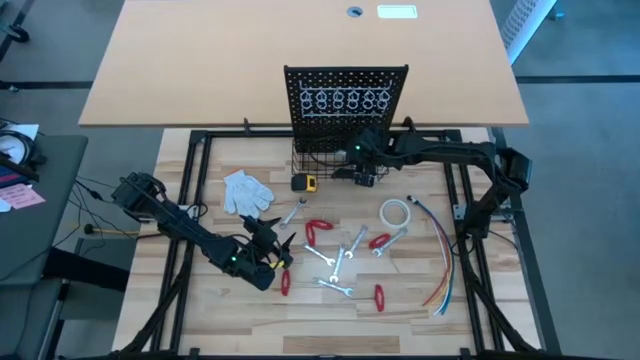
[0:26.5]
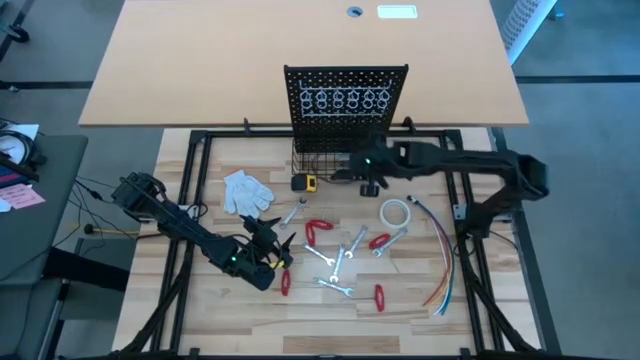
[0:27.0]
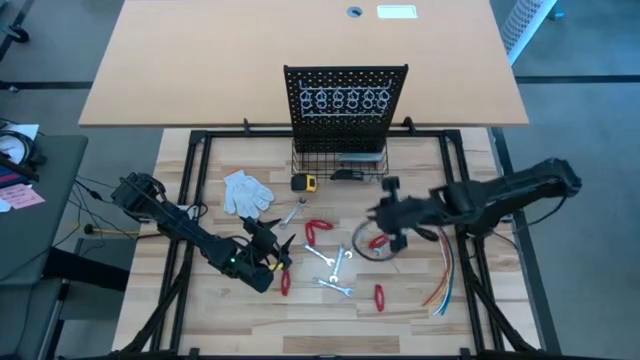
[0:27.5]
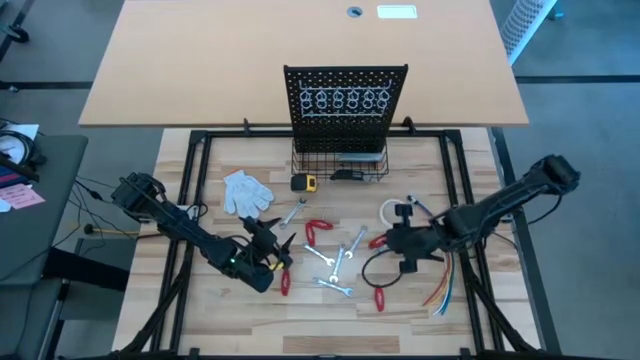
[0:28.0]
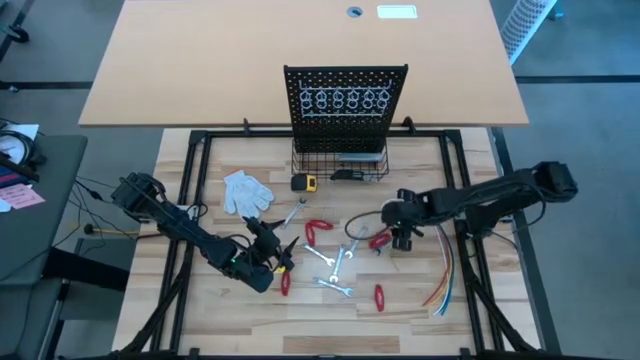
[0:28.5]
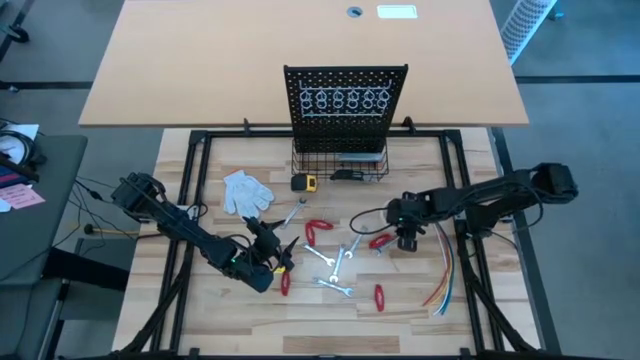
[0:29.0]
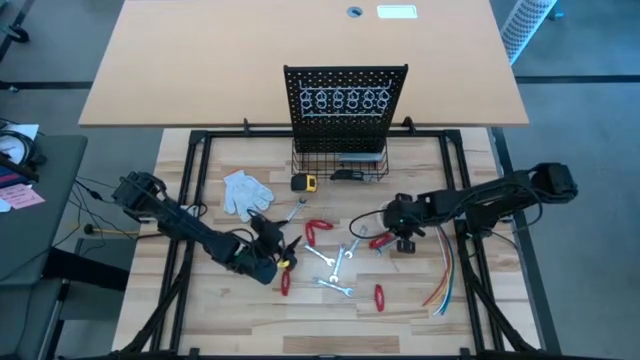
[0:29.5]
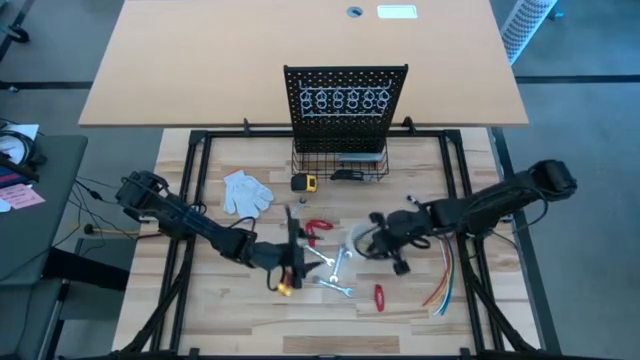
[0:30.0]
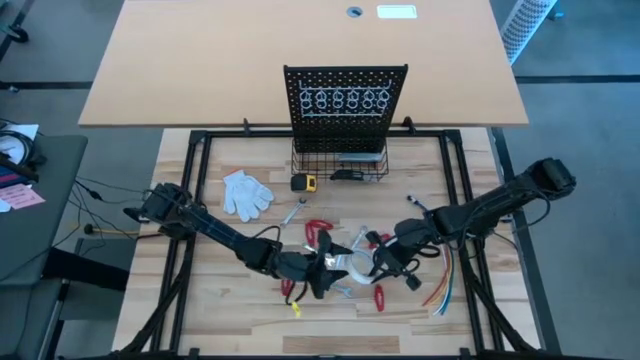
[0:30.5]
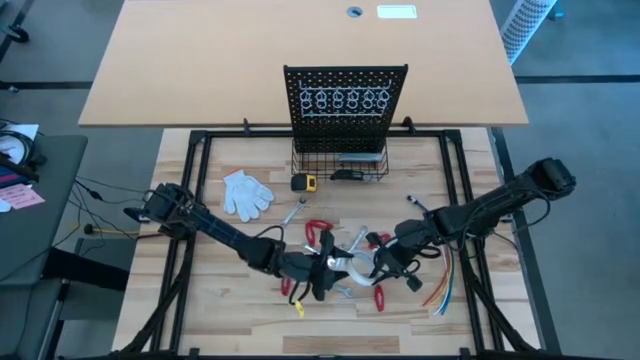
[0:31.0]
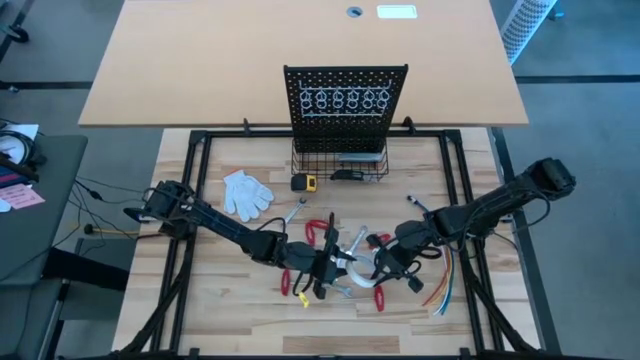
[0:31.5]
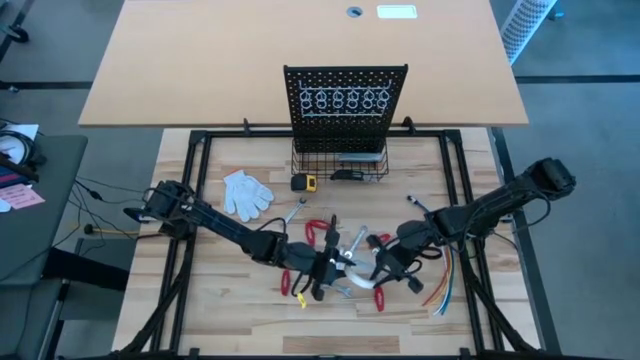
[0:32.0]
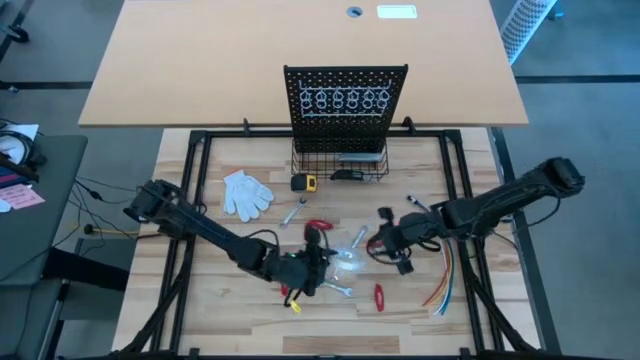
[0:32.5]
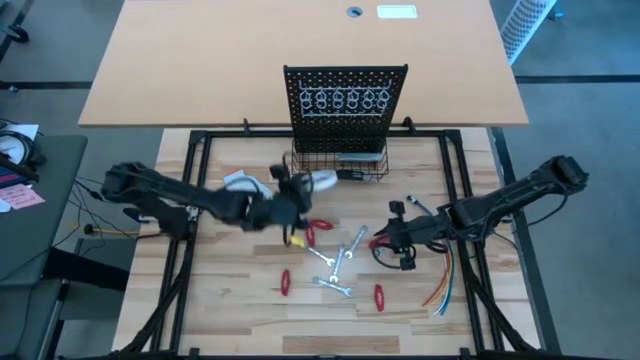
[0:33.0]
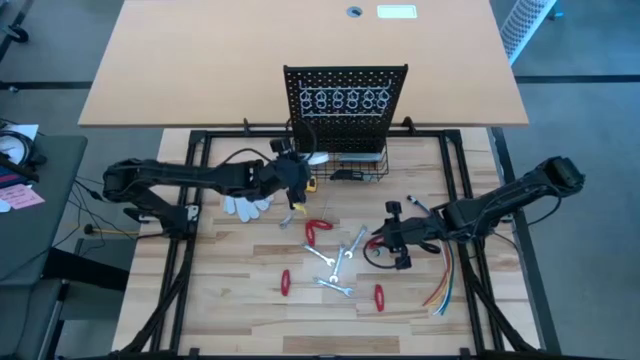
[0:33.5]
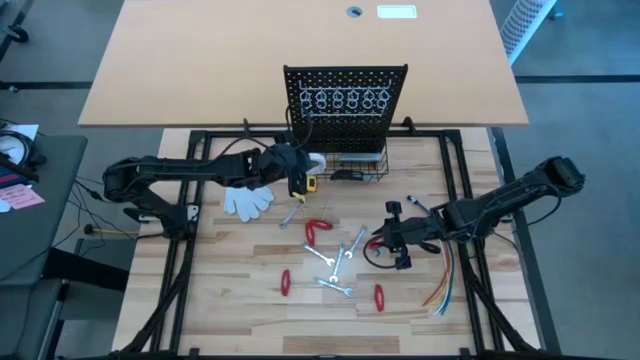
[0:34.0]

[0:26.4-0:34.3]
Task: Hang tools onto peg board
Put the white masking tape into the black wire basket of the peg board

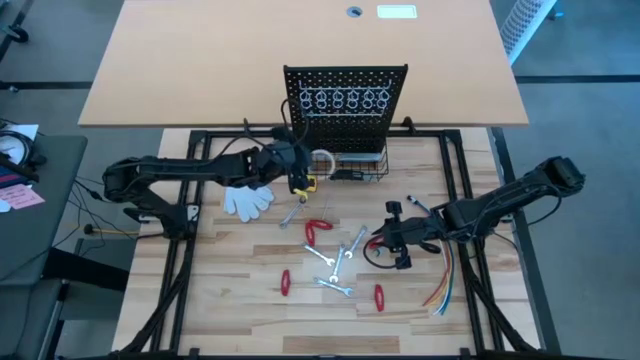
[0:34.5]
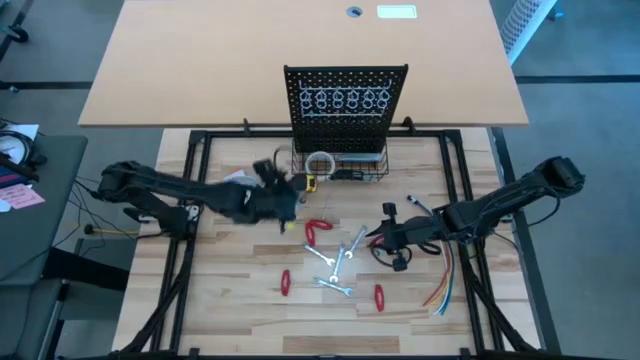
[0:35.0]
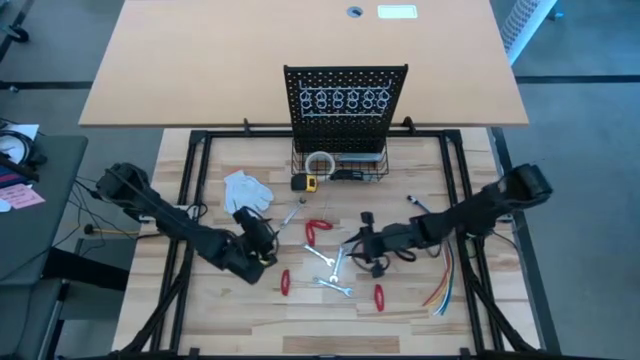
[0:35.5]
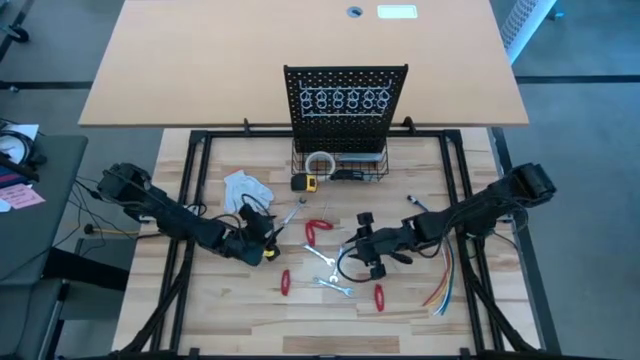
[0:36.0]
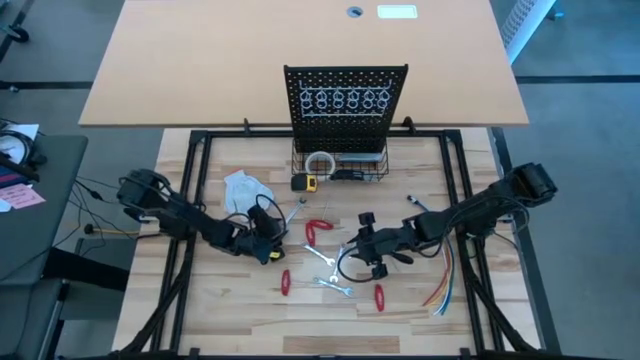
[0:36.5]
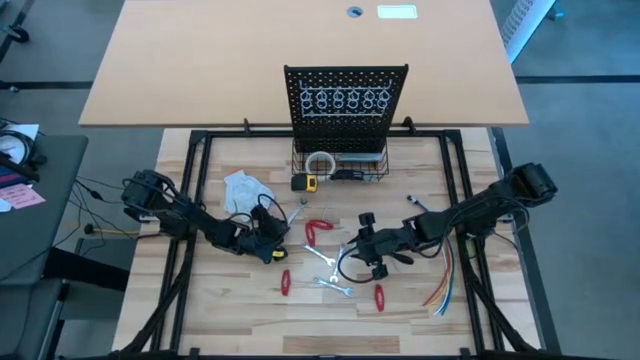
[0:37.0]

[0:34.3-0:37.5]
Hang the silver wrench on the peg board

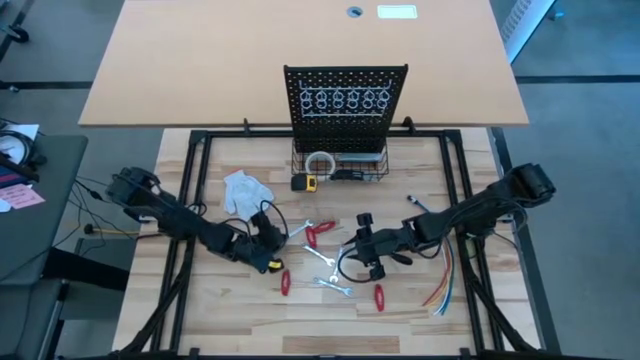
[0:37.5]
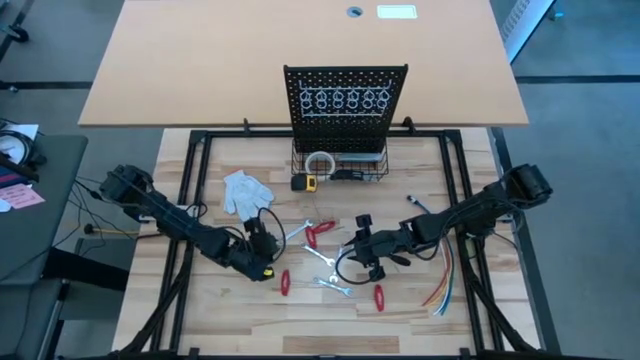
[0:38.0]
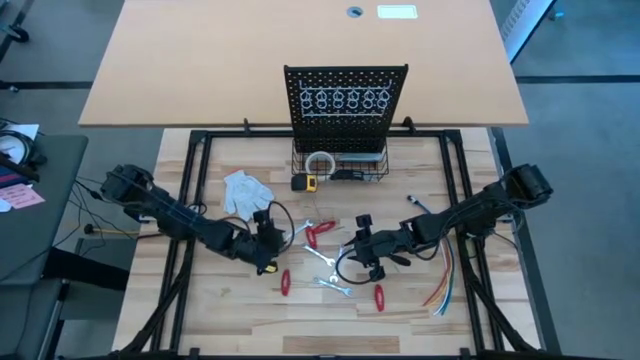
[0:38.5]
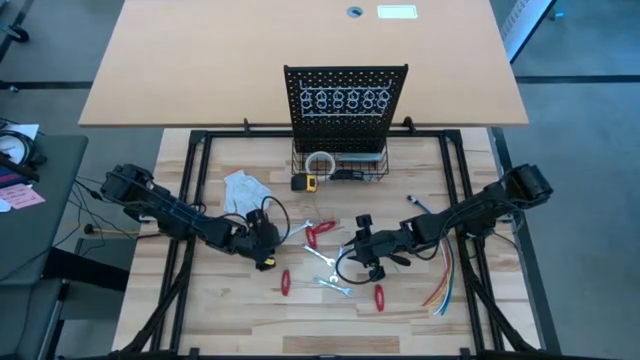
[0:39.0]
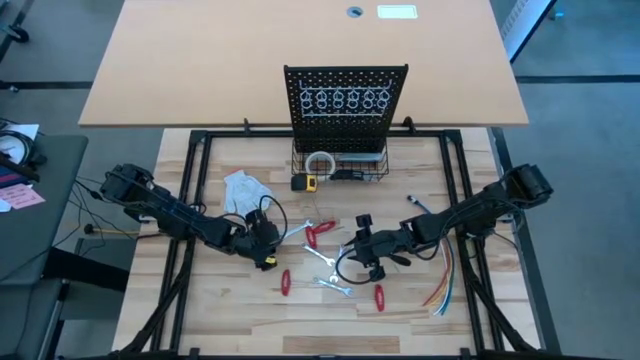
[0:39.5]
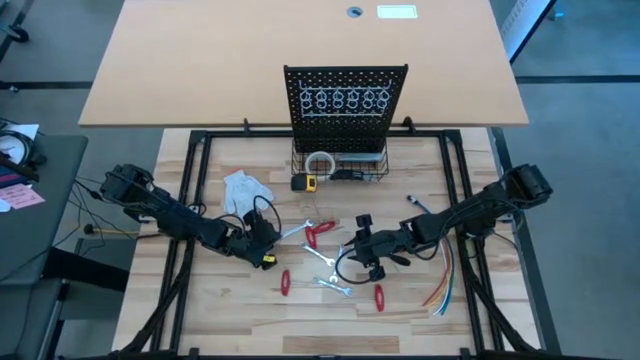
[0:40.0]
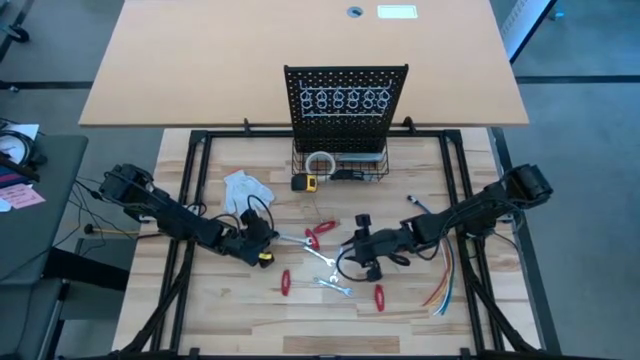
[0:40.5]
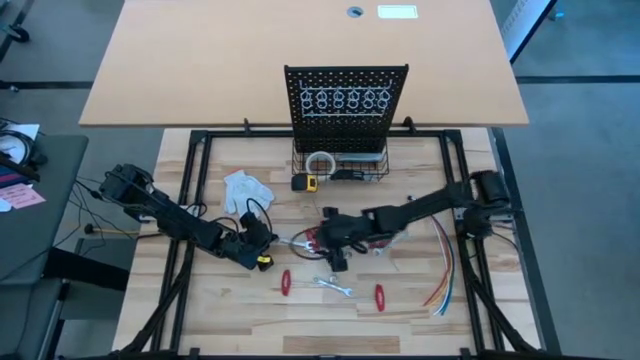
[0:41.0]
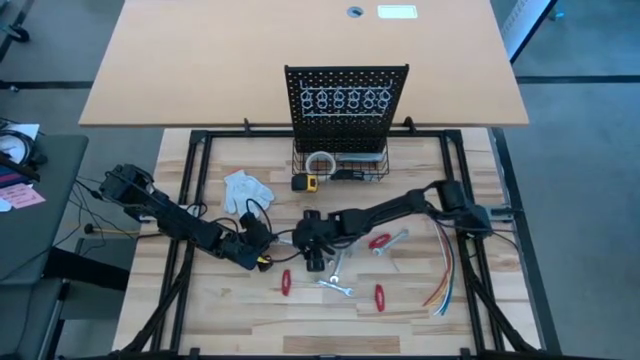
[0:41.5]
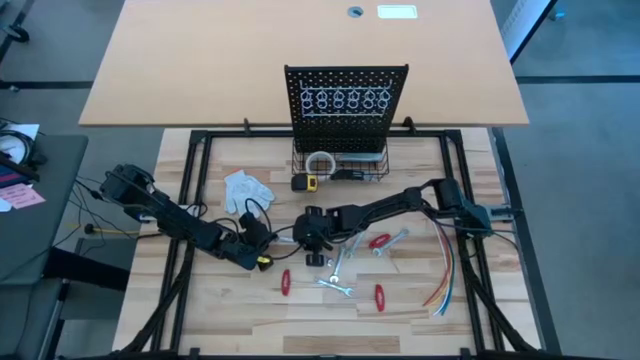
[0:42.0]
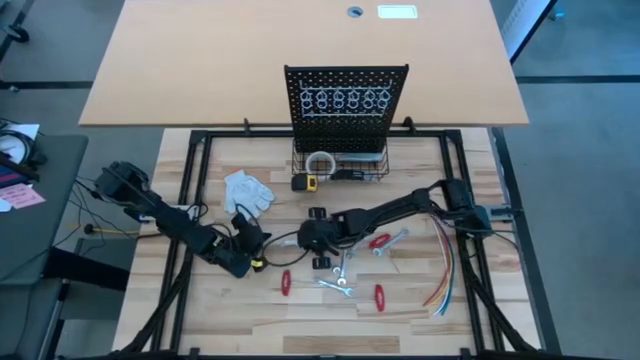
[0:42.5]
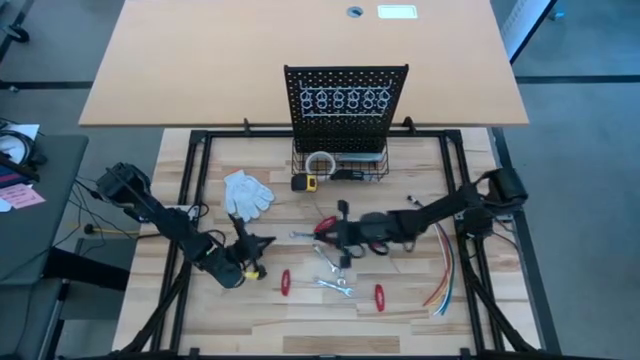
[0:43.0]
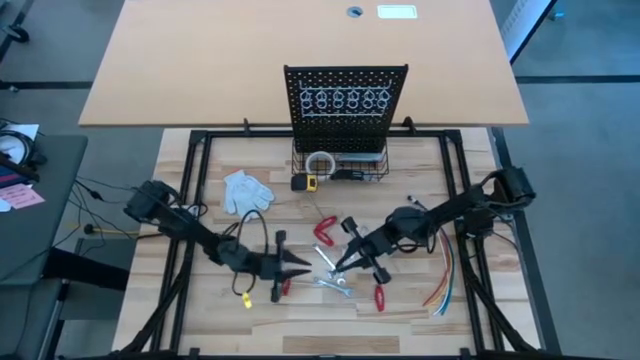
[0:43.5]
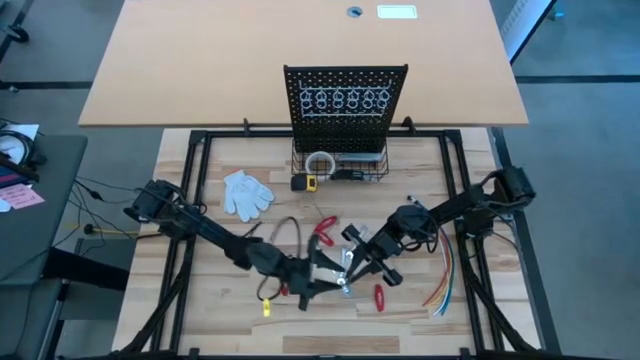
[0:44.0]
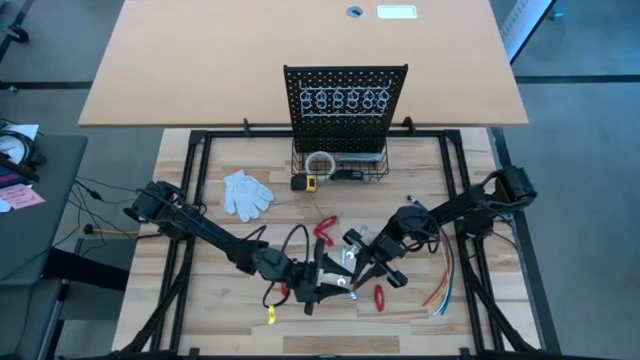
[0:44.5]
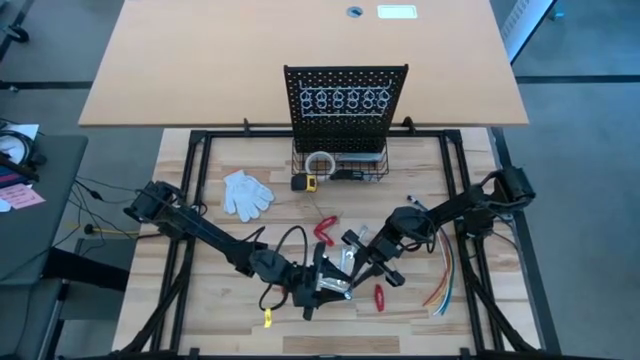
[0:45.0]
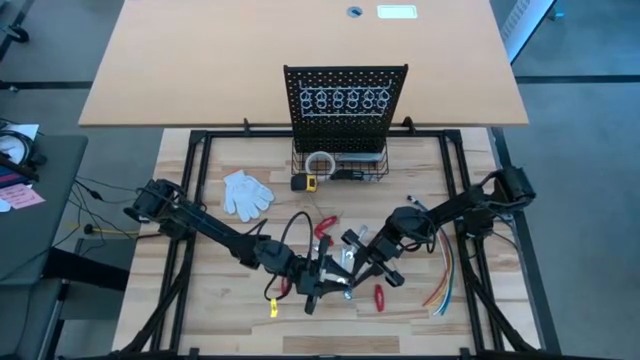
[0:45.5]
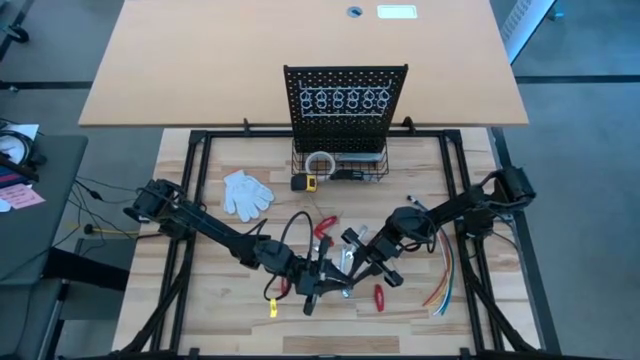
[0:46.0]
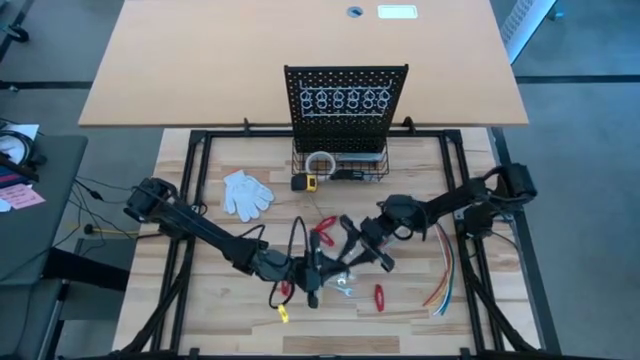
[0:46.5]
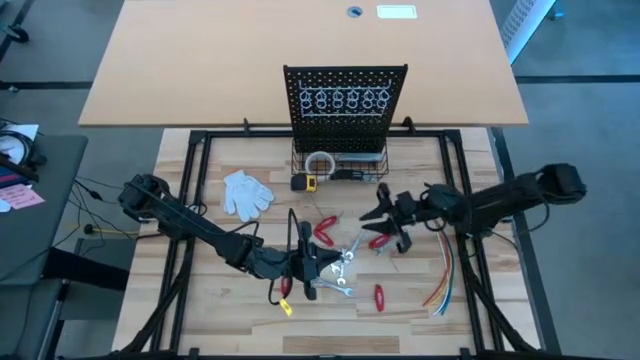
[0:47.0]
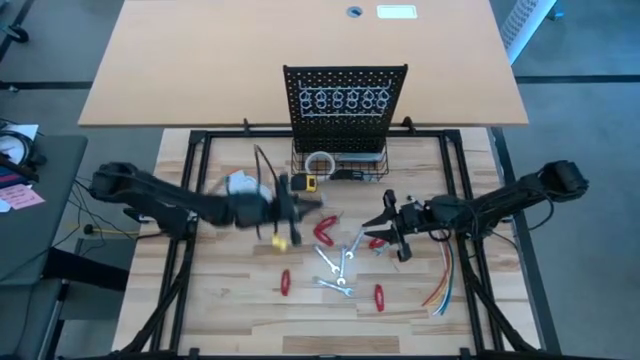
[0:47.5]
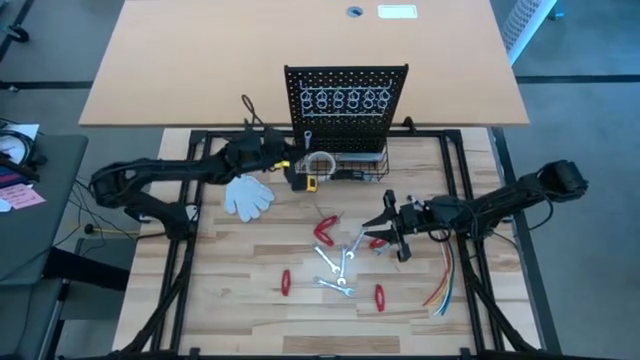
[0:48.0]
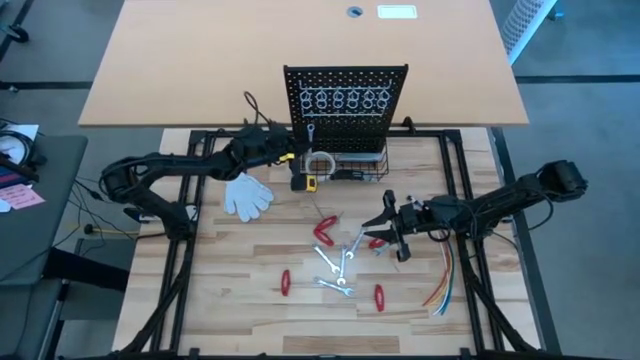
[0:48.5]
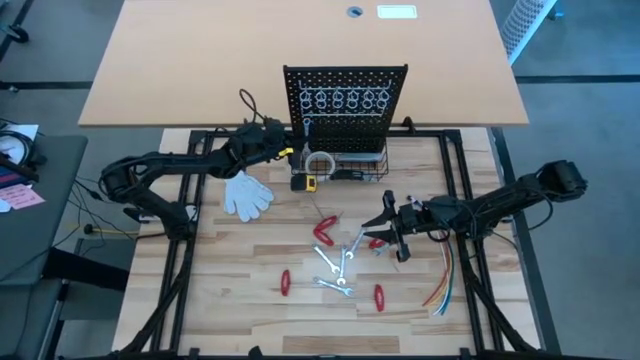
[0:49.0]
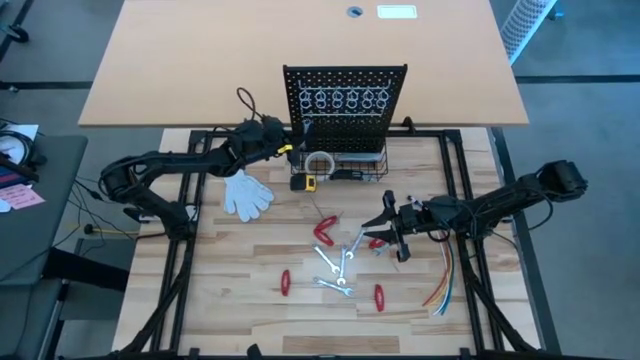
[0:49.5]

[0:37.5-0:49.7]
Hang the silver wrench on the peg board
